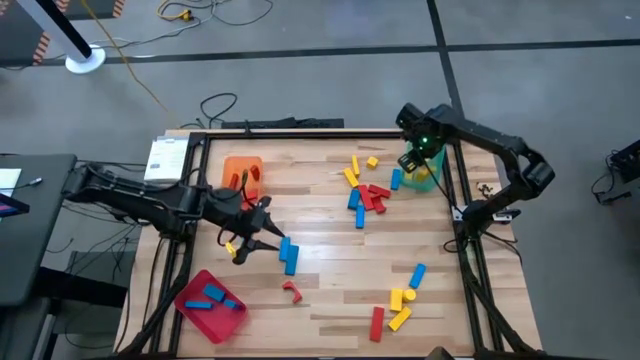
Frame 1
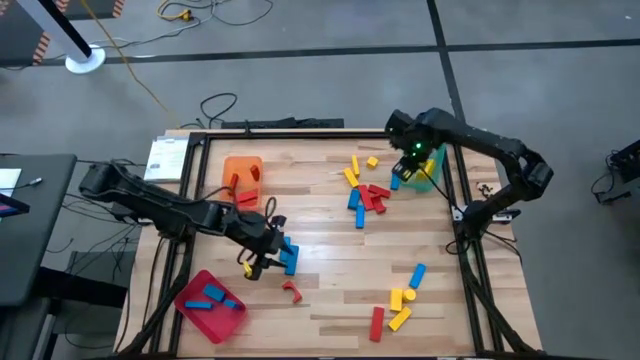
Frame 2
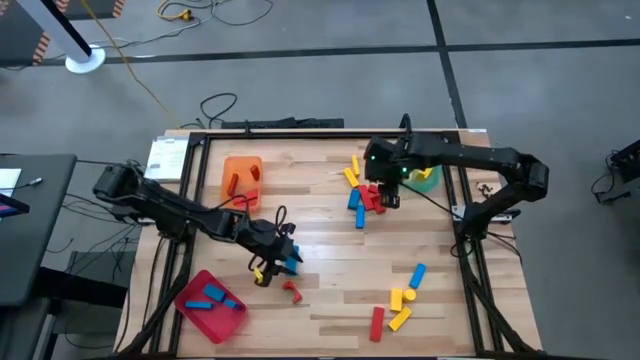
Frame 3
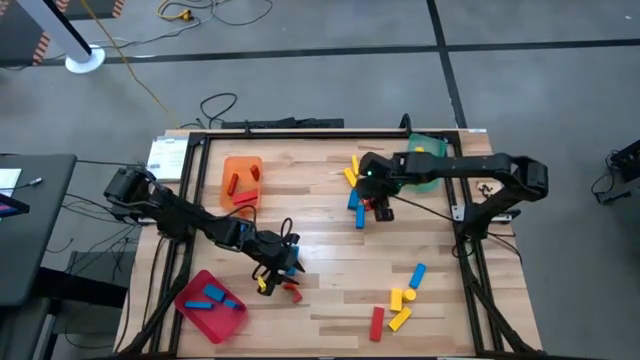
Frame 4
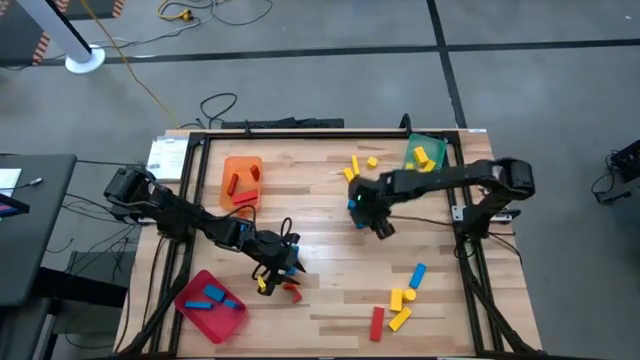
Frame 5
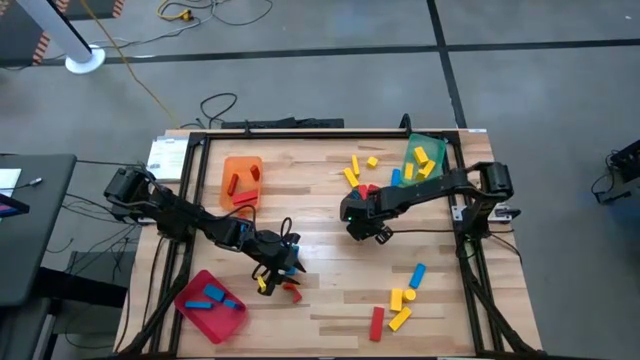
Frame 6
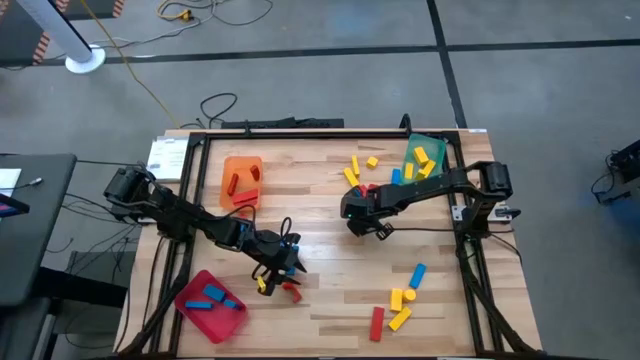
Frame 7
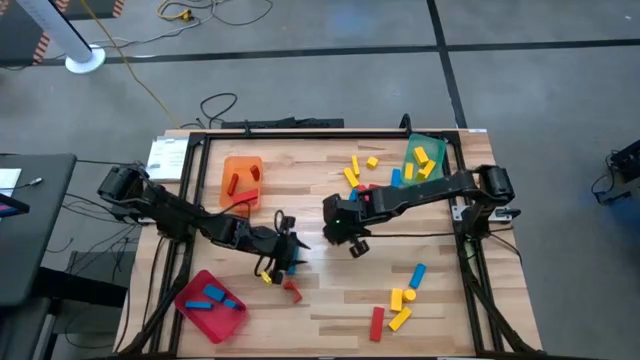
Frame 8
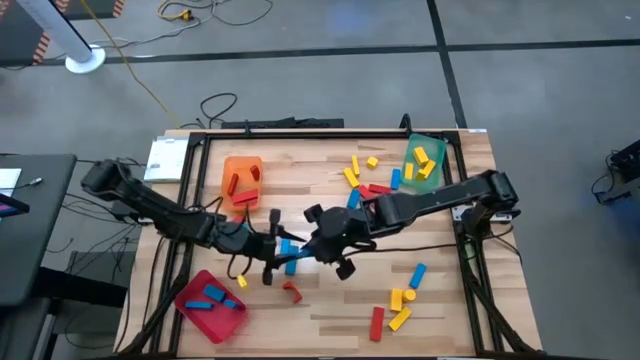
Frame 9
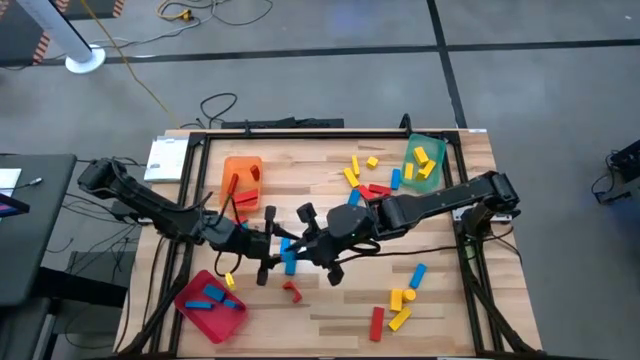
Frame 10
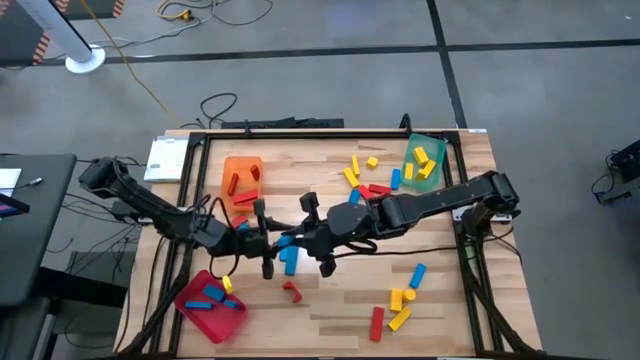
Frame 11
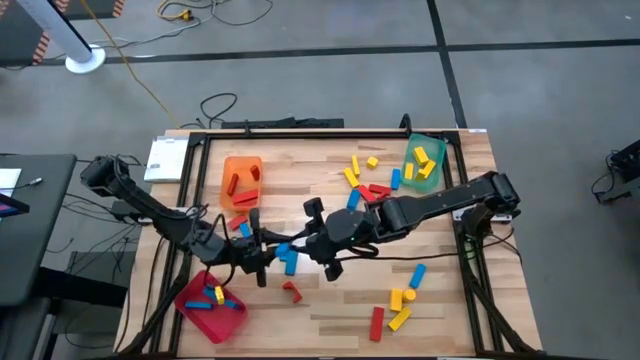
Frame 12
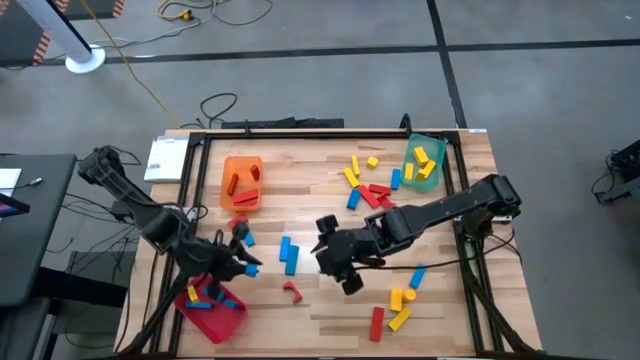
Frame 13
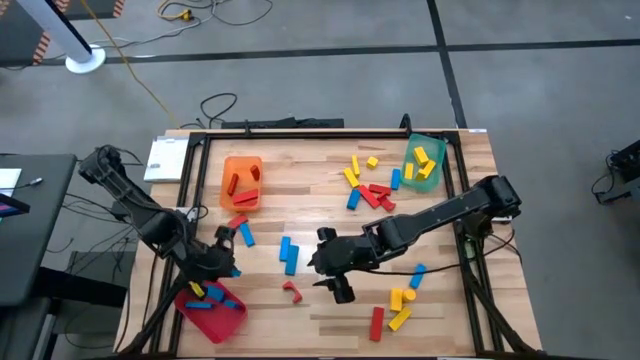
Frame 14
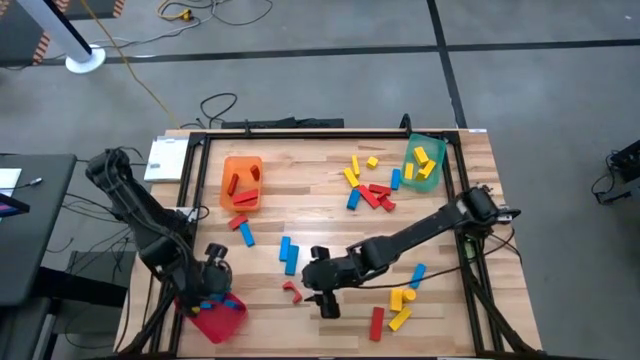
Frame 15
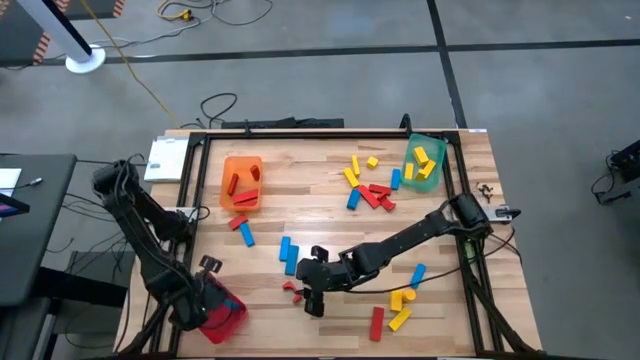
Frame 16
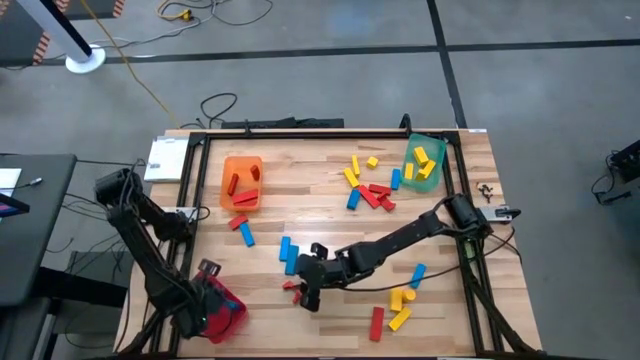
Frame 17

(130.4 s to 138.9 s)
Task: Sort blocks
Put the blue wooden block into the red bin

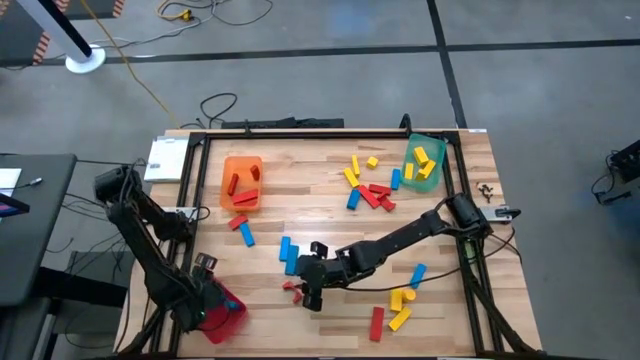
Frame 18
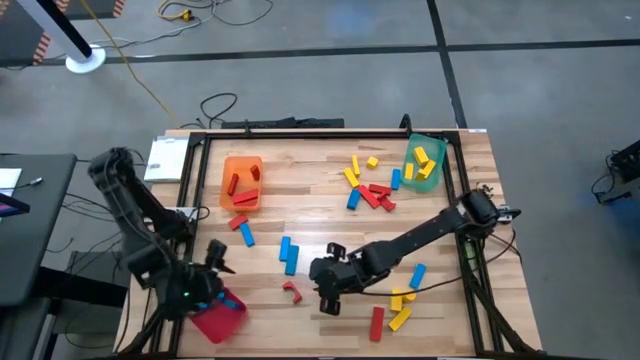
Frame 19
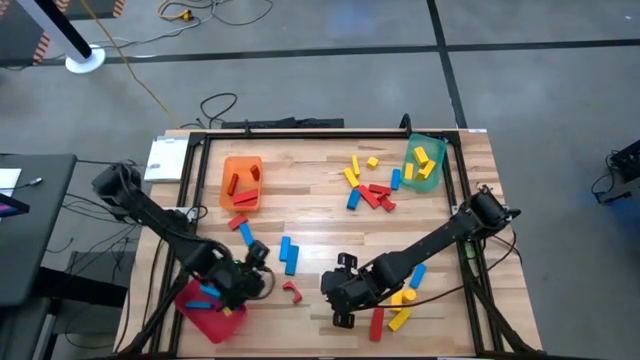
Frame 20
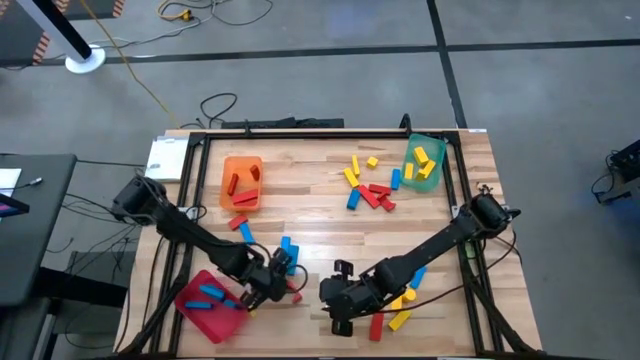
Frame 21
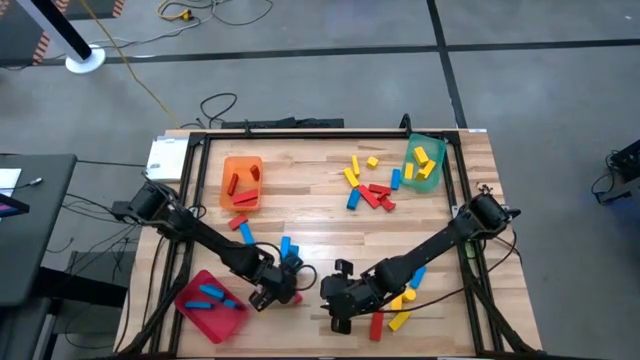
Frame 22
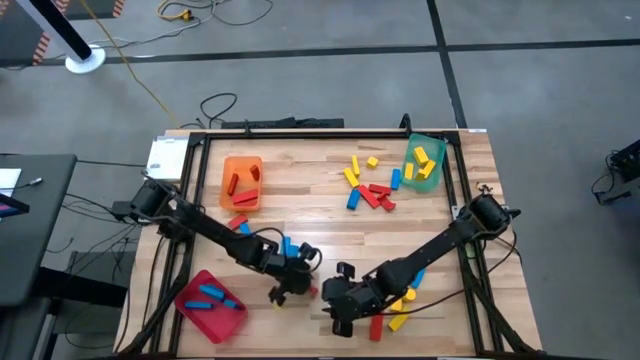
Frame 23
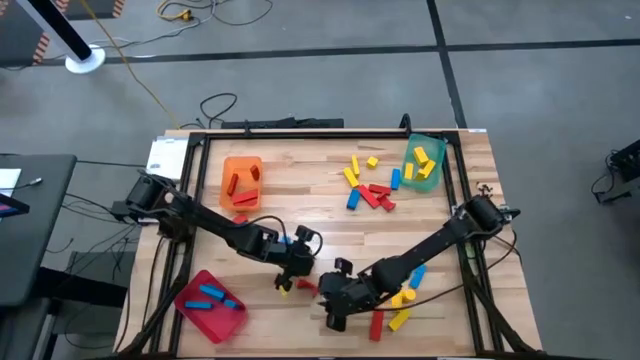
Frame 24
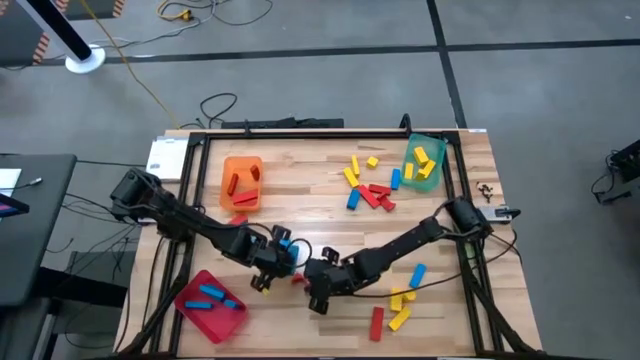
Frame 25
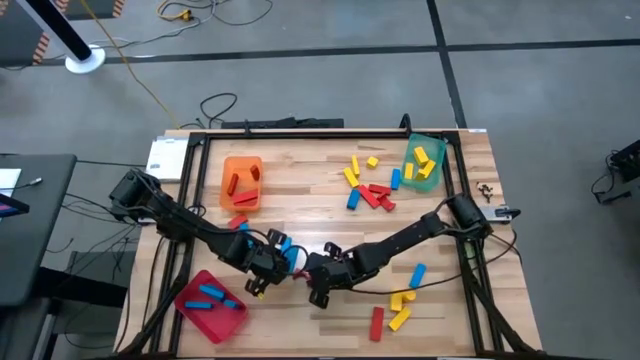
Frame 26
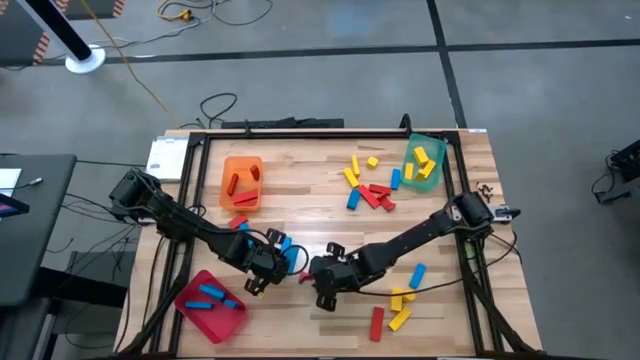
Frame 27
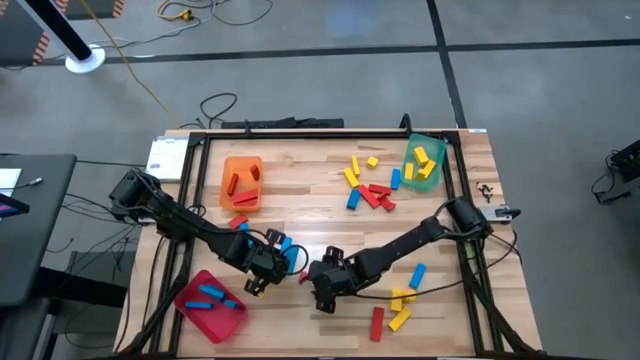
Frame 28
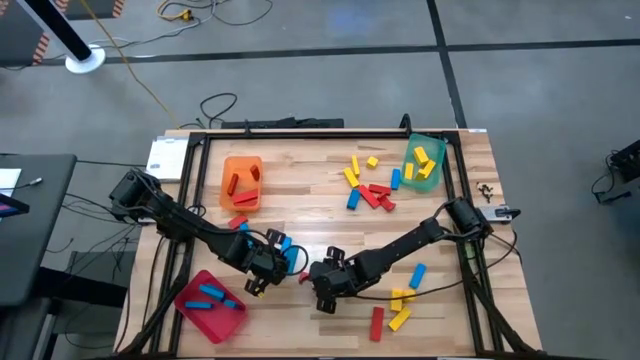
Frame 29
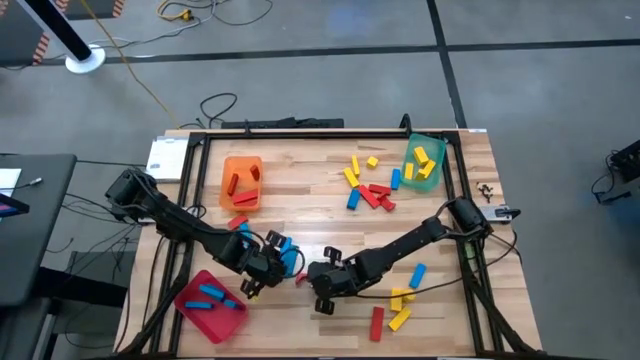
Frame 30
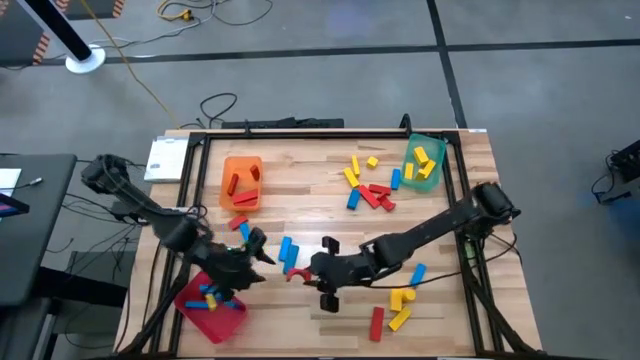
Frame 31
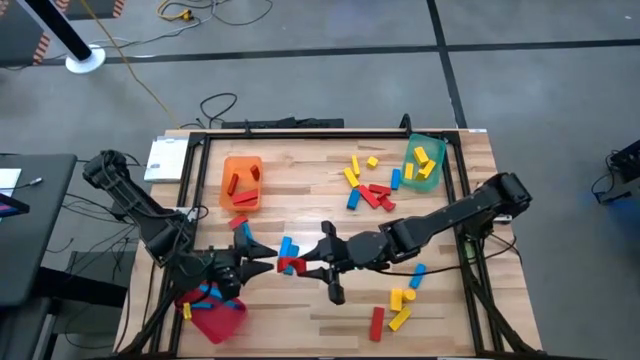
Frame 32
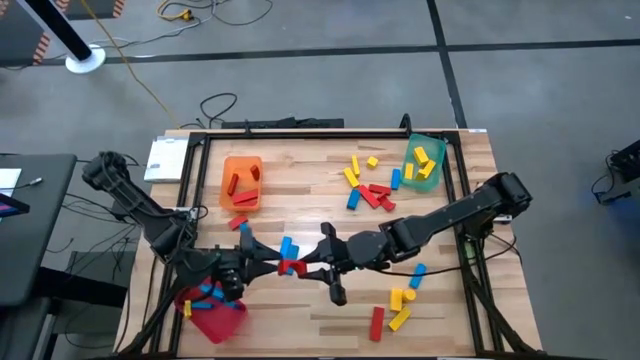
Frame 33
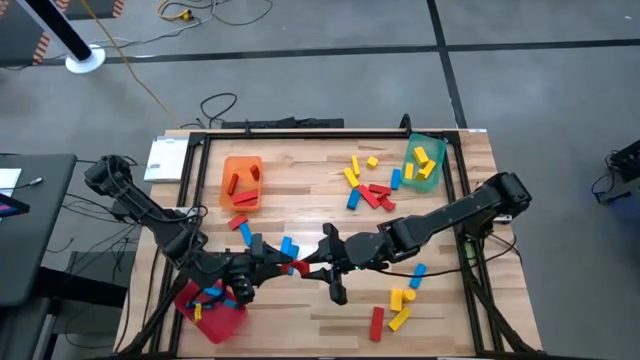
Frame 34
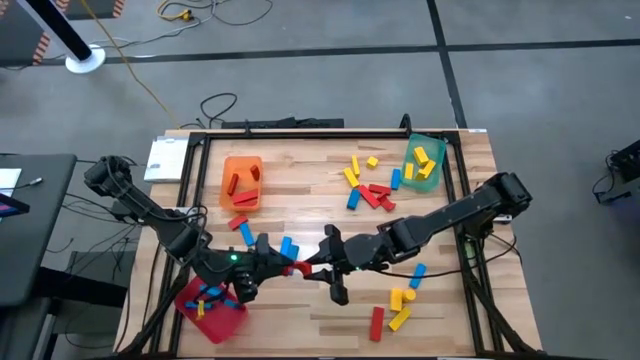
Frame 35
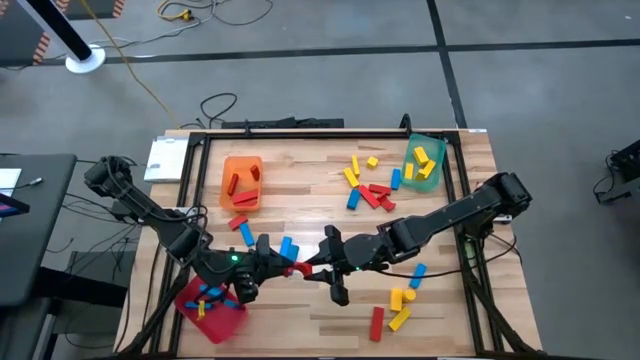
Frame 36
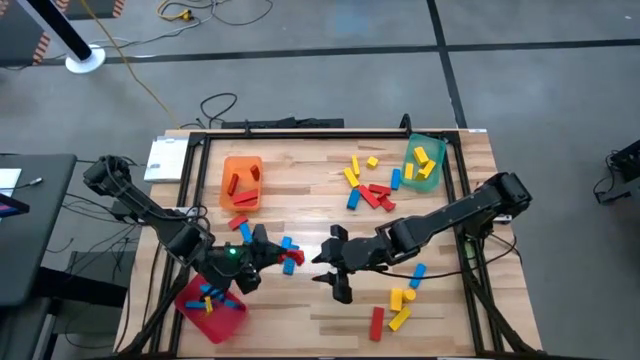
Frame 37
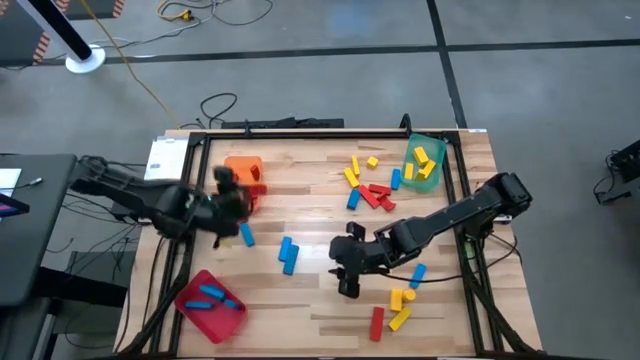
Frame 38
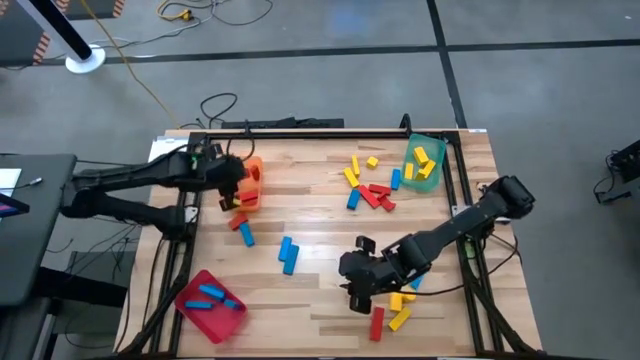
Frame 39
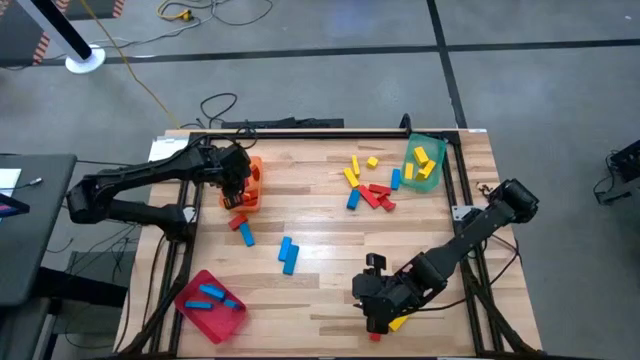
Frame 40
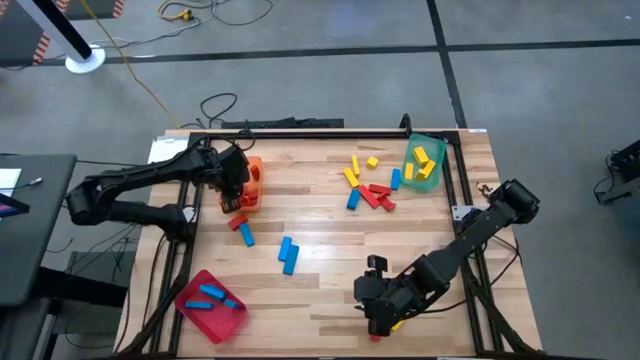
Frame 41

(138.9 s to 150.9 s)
Put the red wooden block into the orange bin
